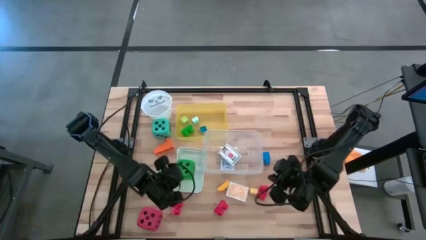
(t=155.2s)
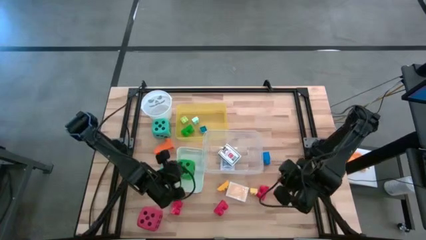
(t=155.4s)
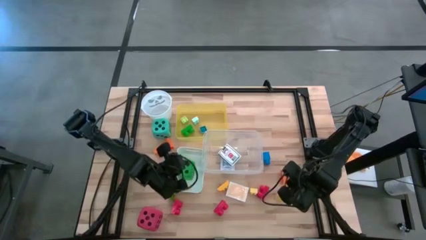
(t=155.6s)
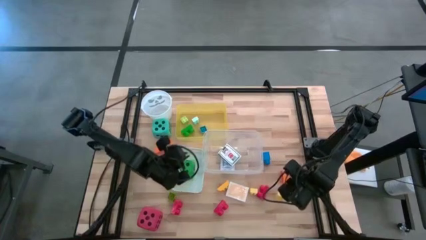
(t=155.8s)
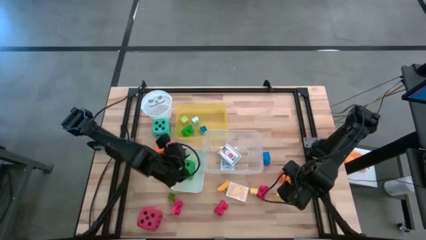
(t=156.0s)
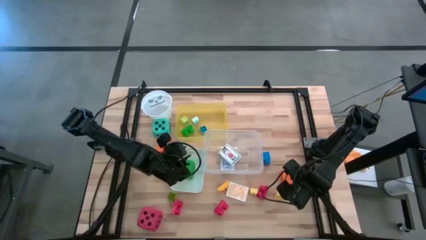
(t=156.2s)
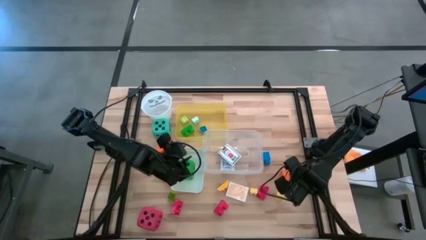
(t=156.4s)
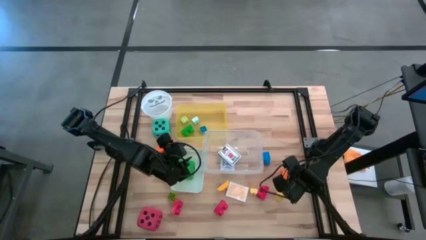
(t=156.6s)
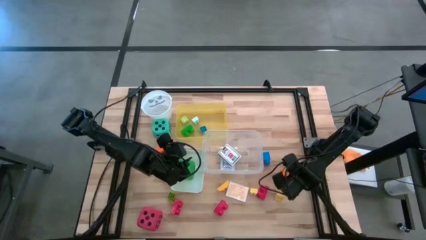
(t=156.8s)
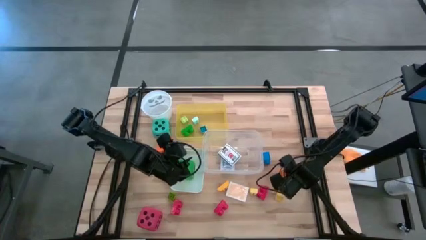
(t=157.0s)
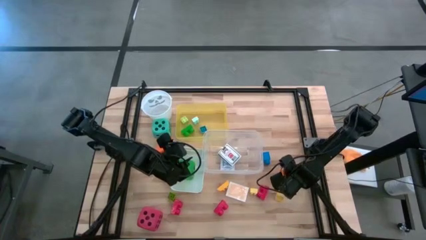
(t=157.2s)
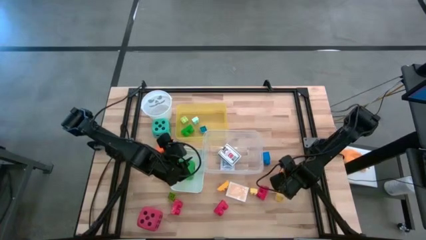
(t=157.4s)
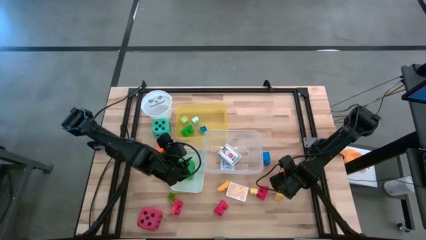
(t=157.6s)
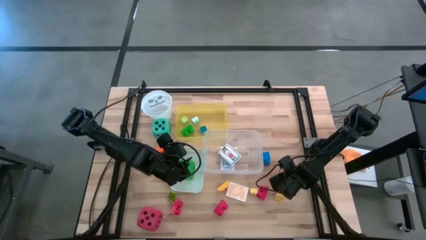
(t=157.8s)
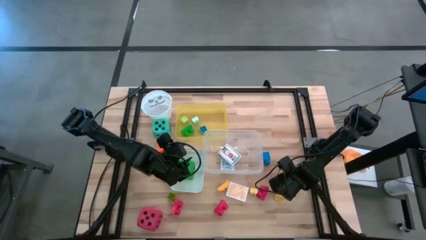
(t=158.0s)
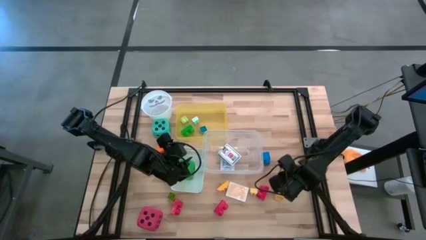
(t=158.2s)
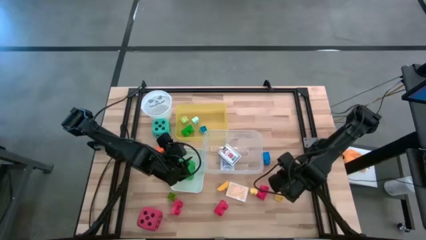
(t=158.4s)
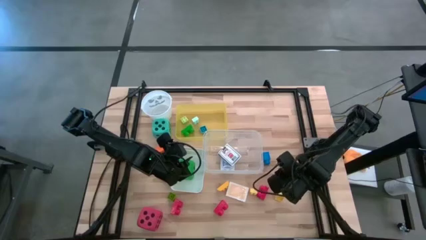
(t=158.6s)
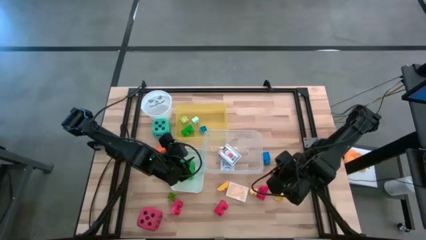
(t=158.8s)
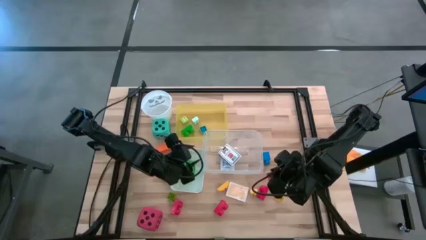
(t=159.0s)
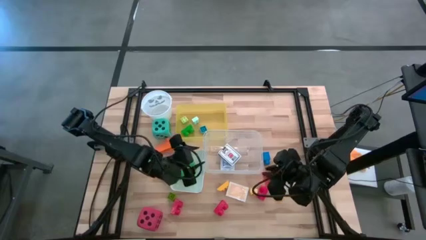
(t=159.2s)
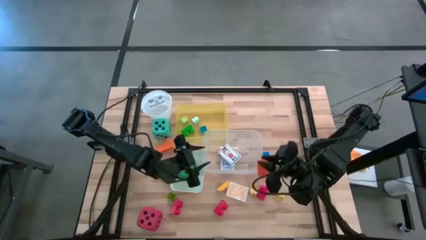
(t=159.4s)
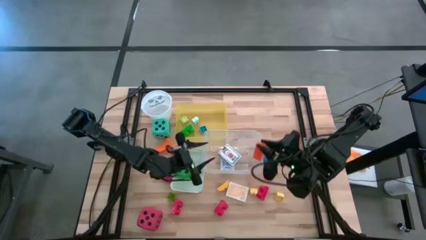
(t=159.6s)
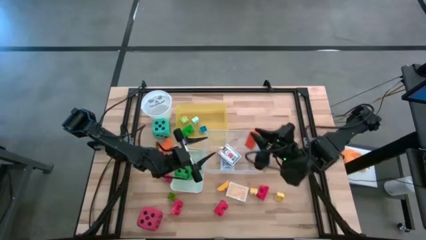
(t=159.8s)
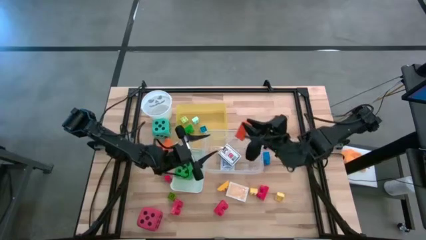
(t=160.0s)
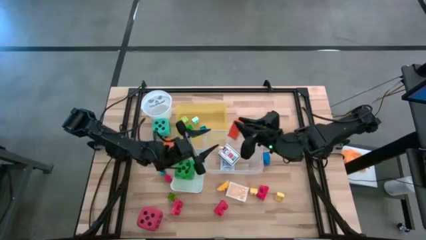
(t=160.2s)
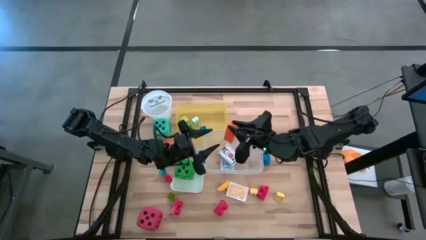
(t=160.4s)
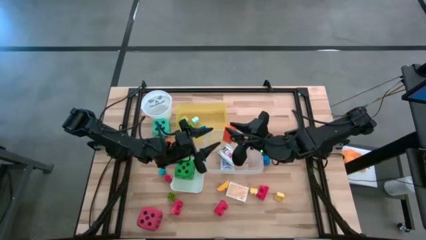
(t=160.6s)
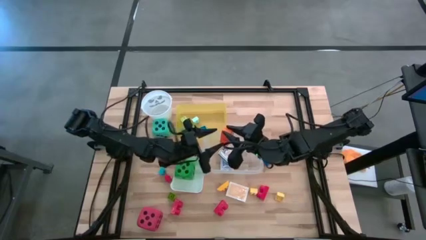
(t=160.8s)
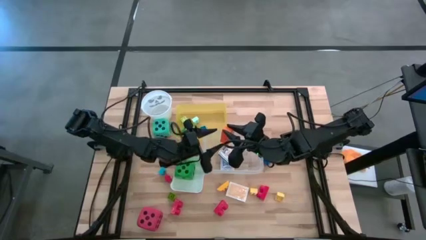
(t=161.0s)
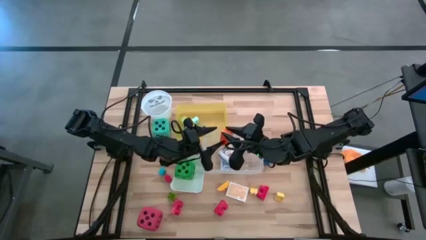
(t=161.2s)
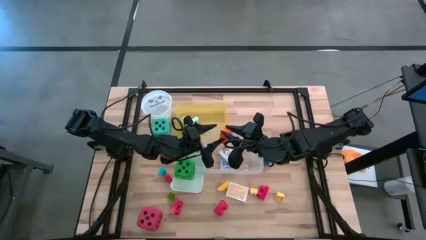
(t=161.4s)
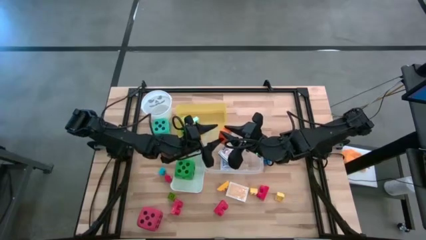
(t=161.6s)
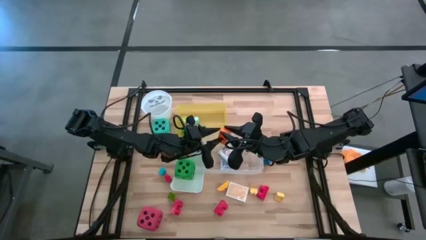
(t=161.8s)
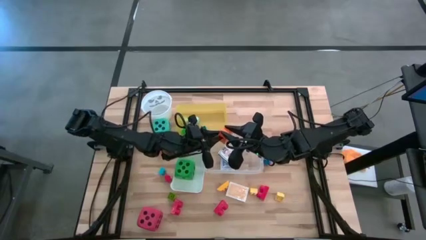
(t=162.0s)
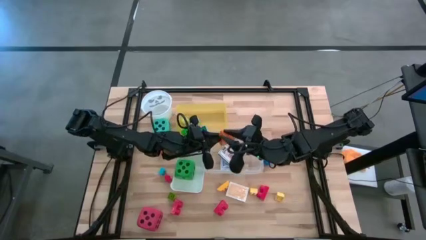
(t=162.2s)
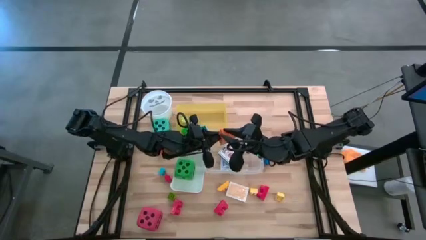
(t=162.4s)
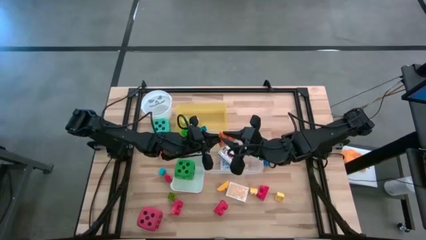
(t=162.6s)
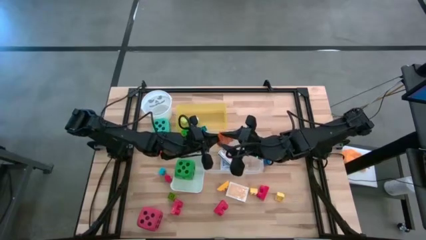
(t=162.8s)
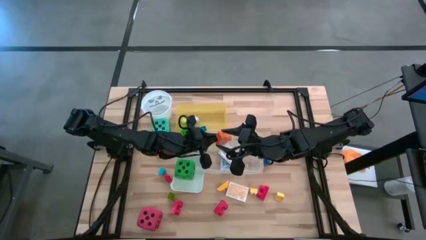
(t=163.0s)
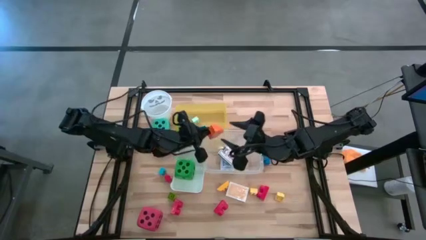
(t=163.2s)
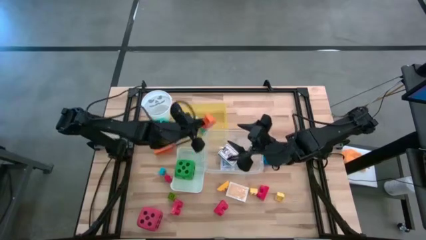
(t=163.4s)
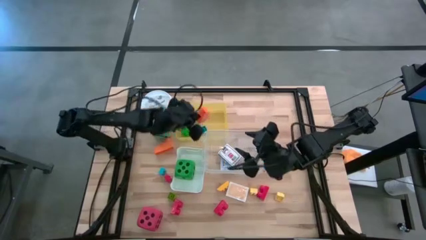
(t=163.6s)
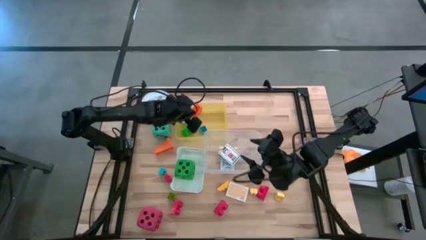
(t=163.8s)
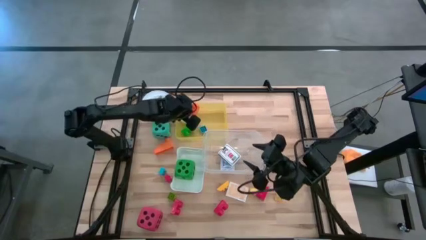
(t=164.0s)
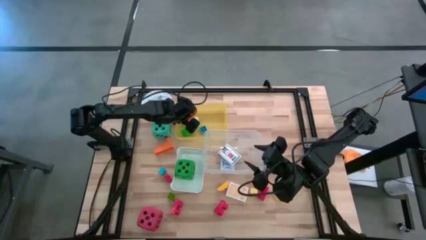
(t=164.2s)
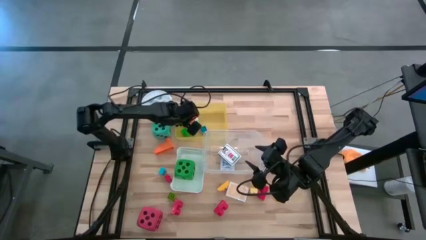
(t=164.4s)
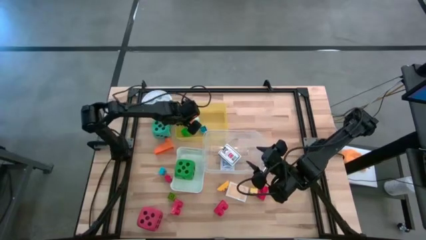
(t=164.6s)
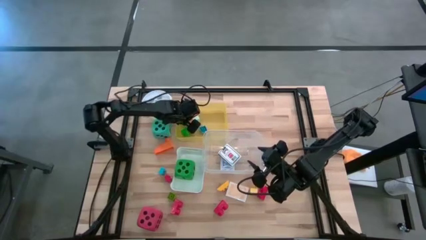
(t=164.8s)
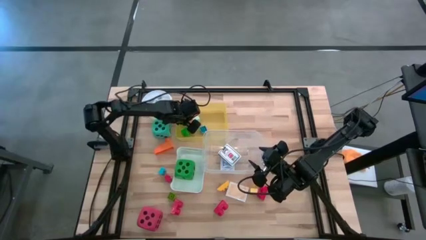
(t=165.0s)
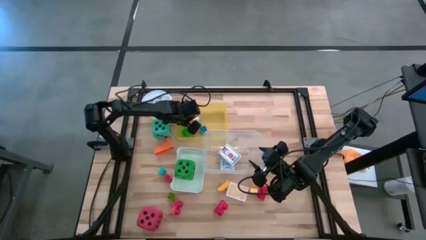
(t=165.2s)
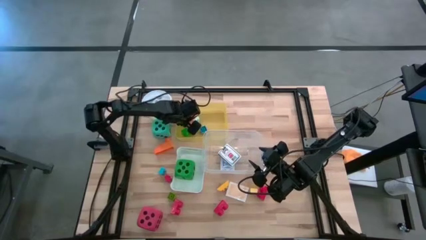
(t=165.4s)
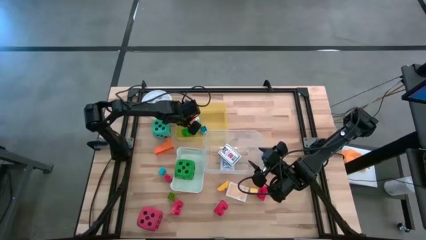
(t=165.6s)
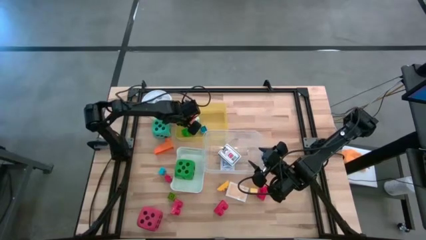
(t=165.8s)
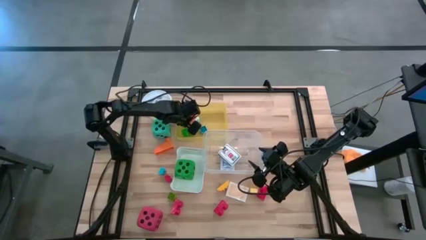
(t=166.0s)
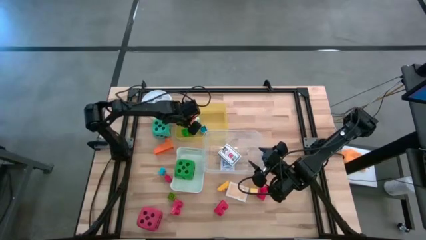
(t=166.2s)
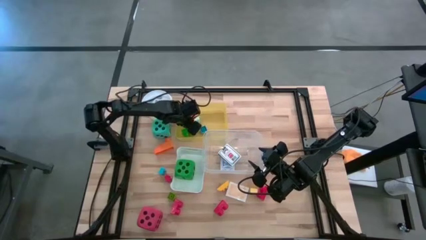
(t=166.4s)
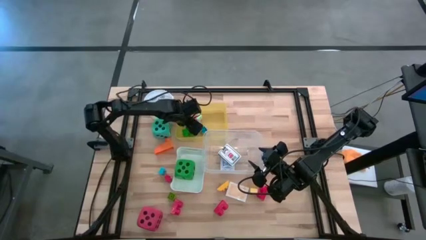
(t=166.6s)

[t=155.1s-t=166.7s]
Task: Pick & Place Toys
Put the orange game piece into the yellow bin

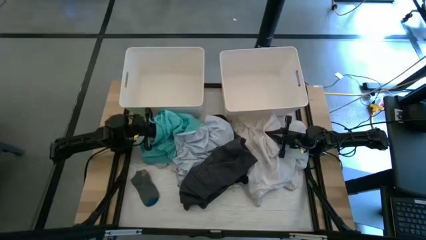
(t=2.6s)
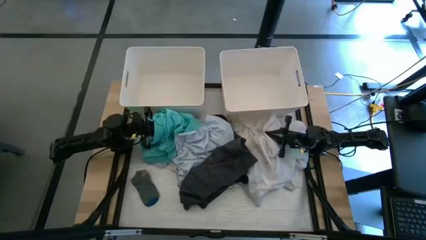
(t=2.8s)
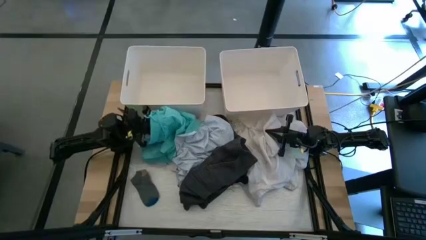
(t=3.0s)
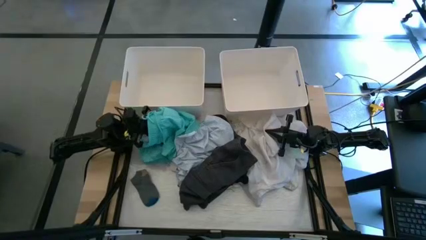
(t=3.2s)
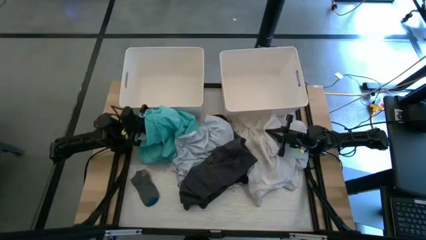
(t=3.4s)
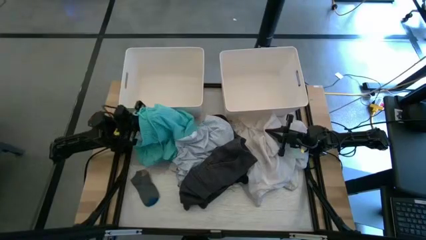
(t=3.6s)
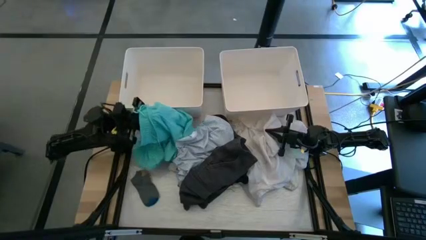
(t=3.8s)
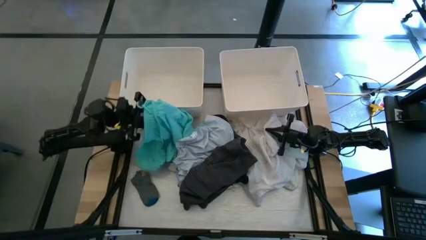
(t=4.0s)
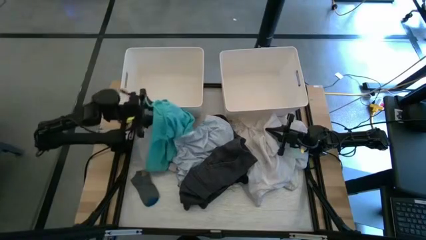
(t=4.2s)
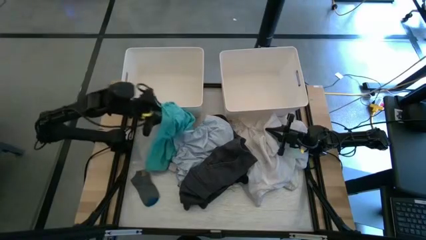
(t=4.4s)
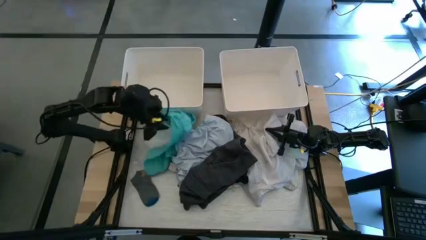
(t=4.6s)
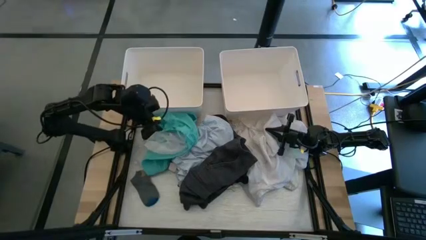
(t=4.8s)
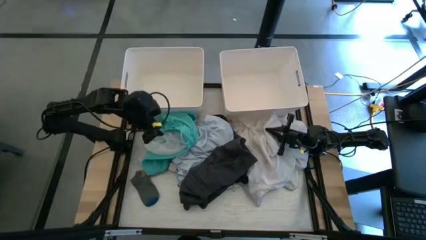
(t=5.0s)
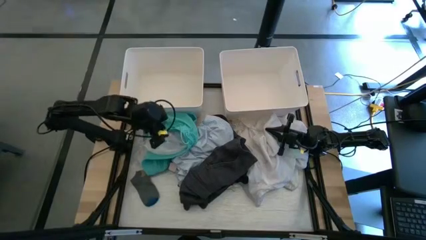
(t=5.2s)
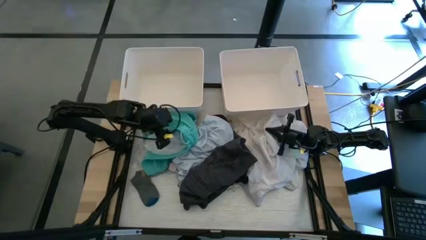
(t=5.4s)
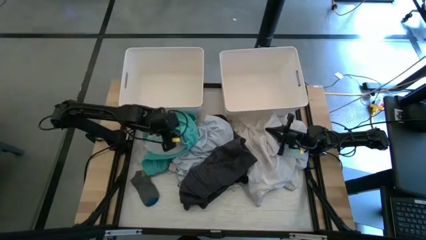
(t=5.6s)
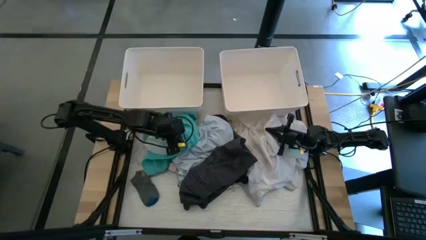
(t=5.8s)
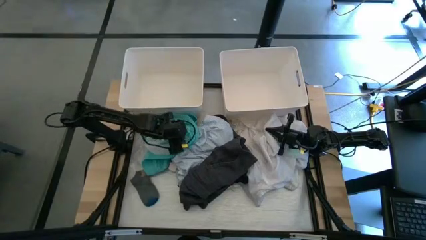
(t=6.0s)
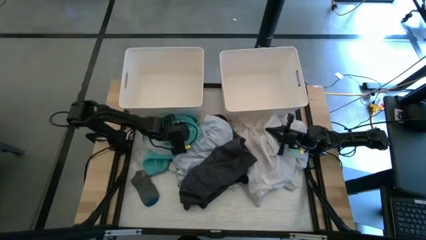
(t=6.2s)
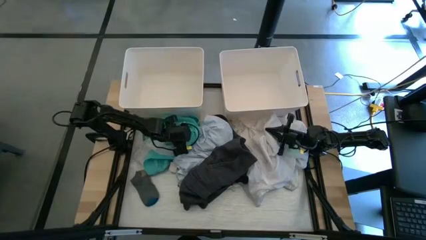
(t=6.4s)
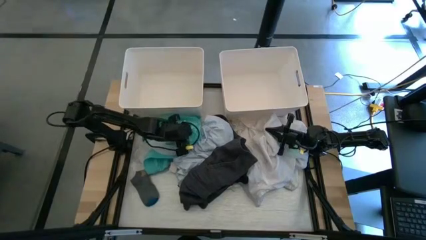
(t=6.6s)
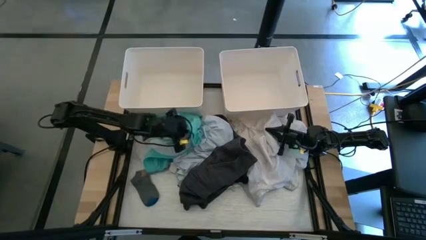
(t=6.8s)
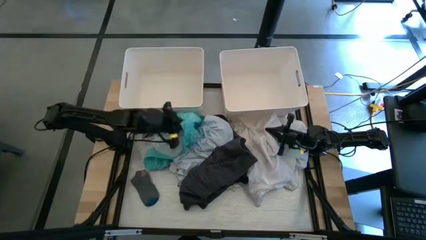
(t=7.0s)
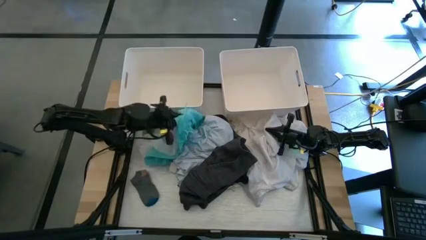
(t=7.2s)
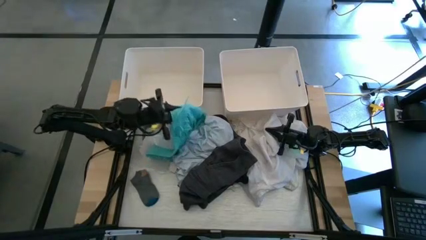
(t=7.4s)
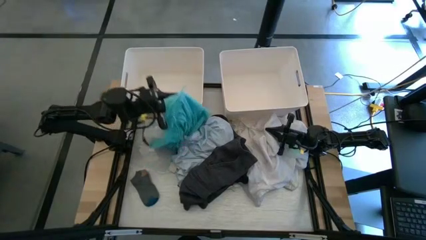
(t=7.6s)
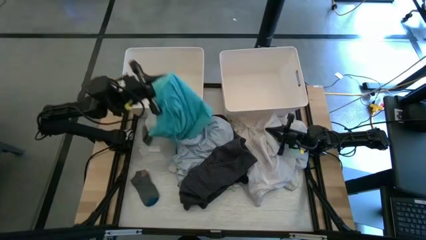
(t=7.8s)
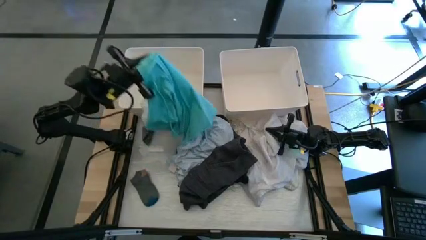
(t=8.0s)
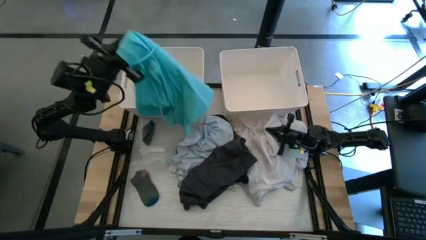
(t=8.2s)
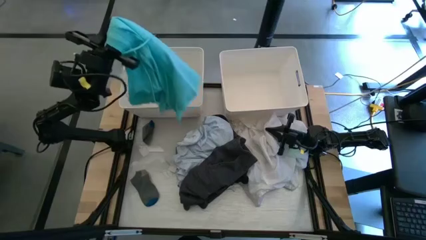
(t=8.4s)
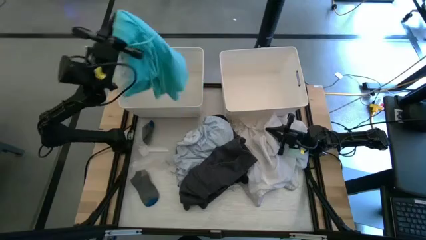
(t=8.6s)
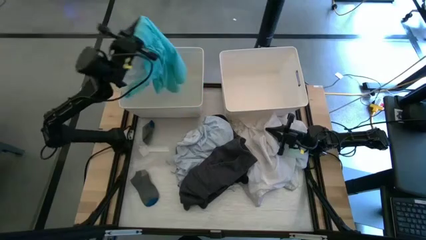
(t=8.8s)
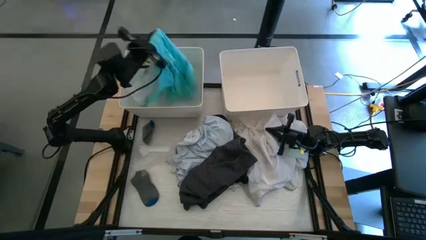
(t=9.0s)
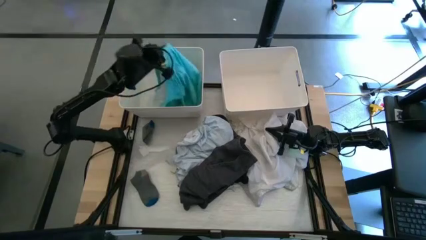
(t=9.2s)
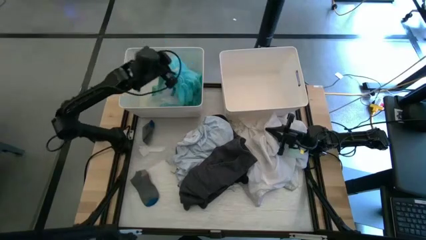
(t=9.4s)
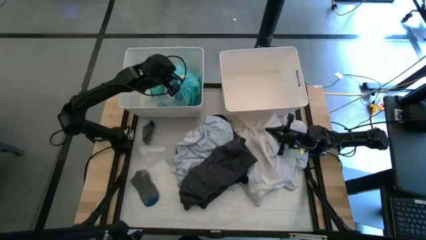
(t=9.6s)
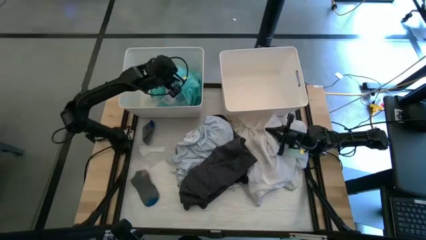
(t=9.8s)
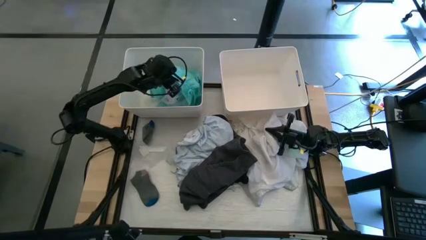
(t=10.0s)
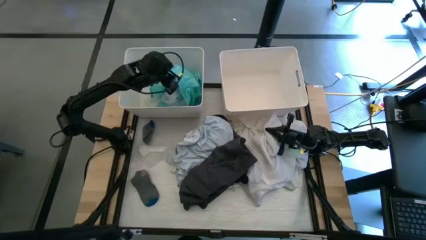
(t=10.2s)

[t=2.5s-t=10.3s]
Task: Sort clothes
Put the green shorts into the left white laundry bin
